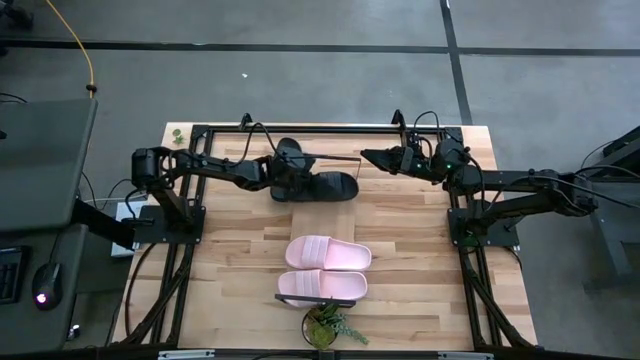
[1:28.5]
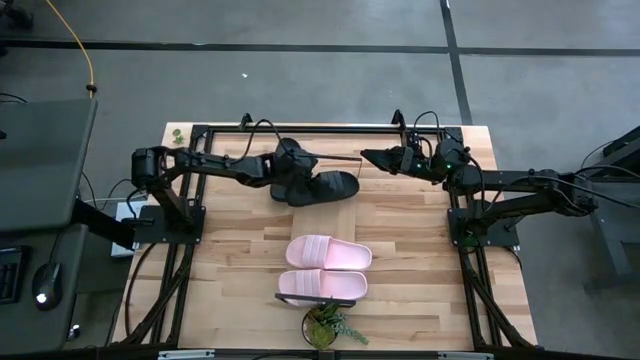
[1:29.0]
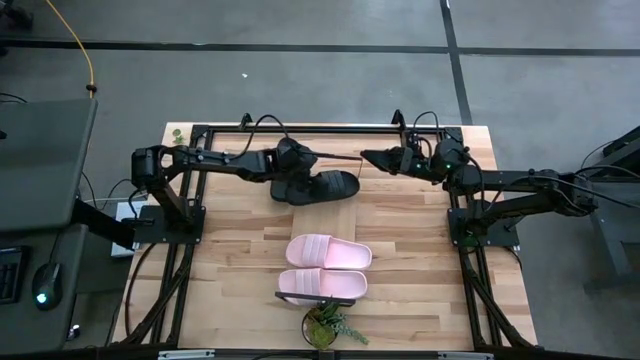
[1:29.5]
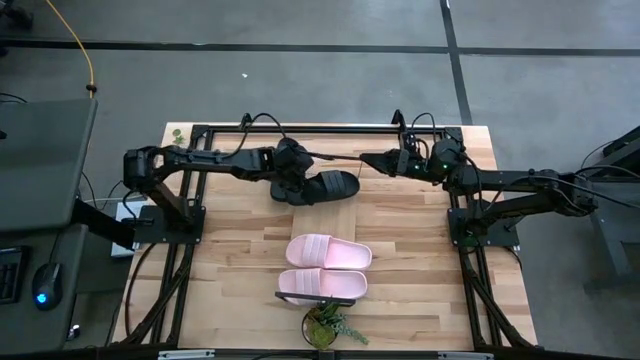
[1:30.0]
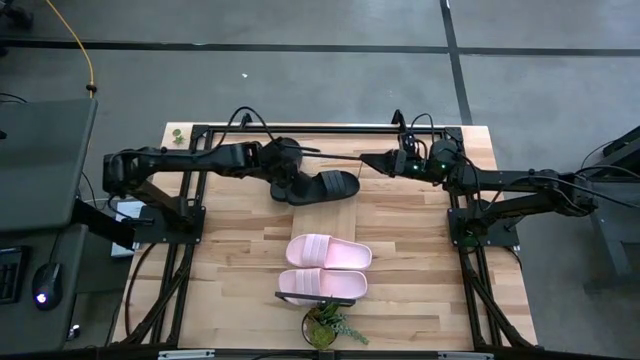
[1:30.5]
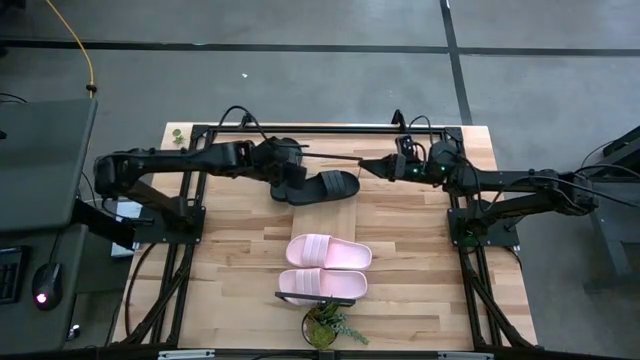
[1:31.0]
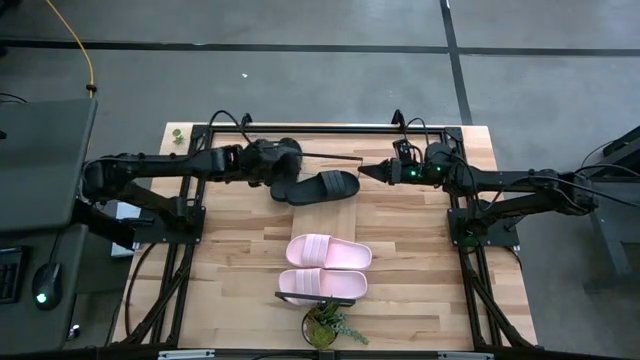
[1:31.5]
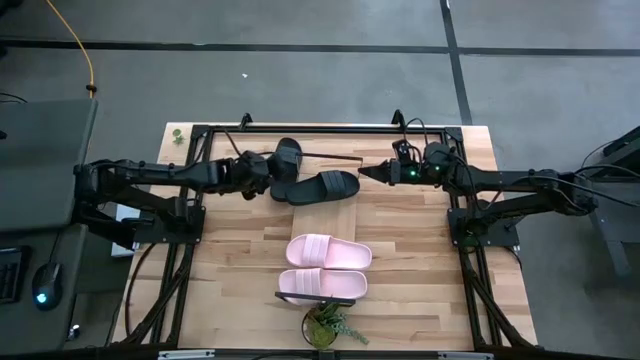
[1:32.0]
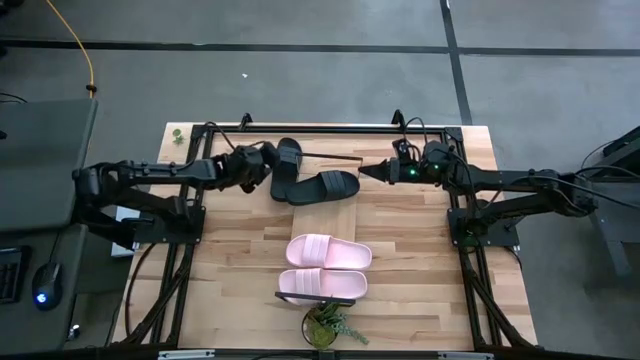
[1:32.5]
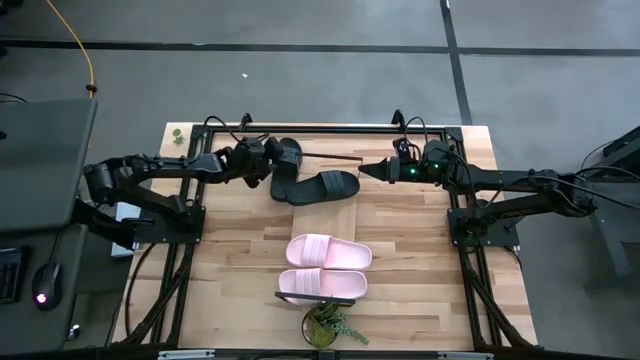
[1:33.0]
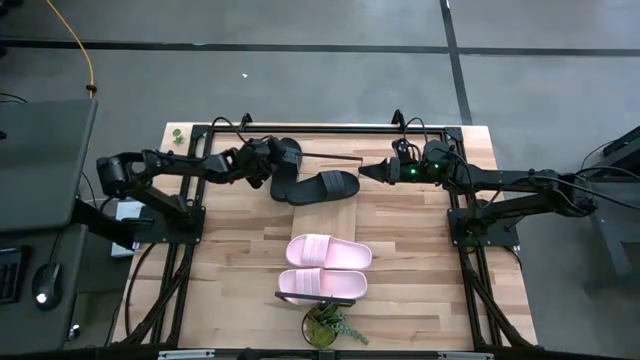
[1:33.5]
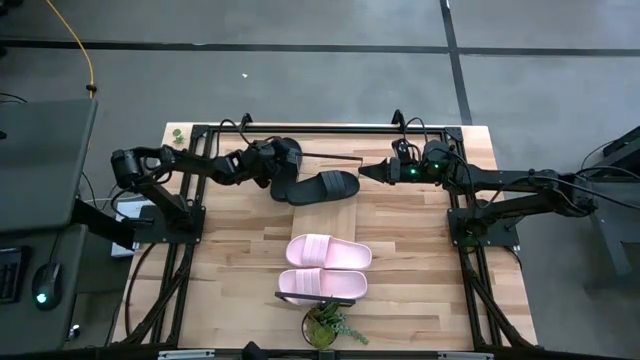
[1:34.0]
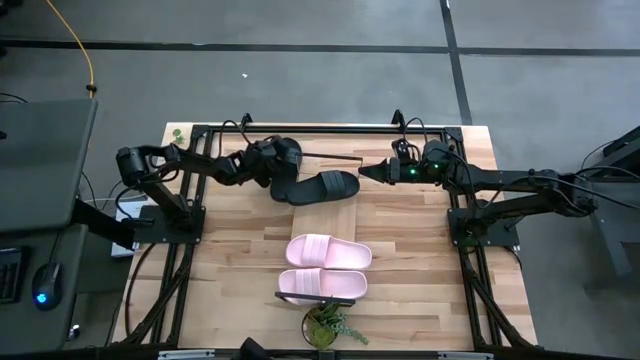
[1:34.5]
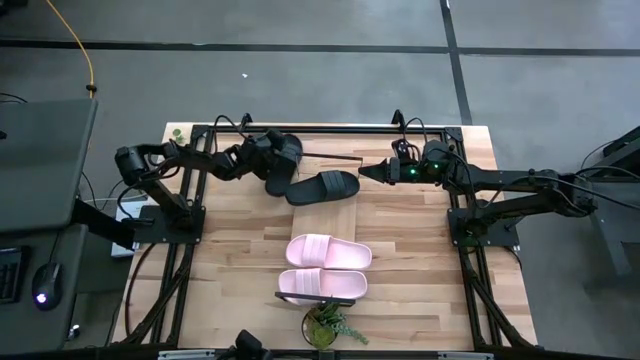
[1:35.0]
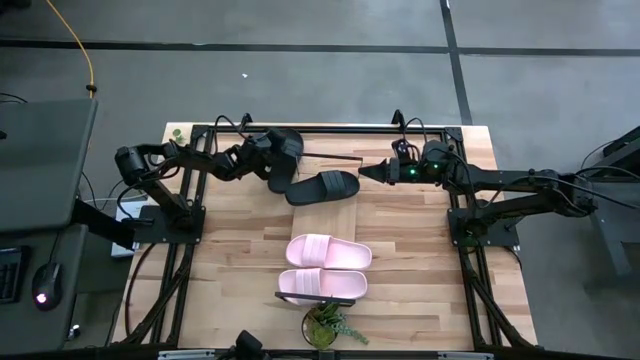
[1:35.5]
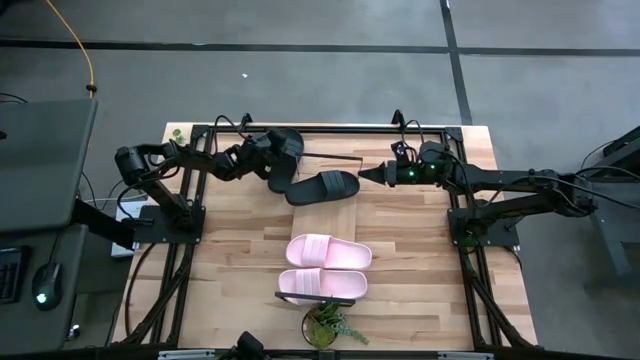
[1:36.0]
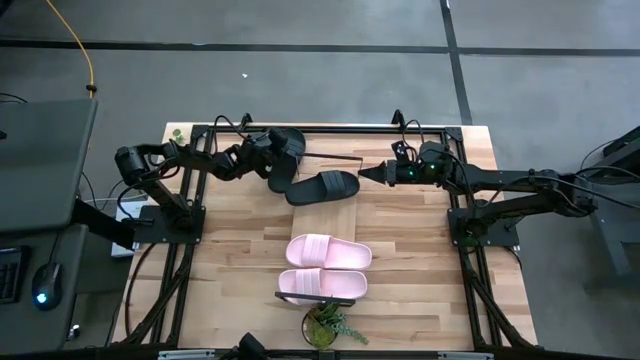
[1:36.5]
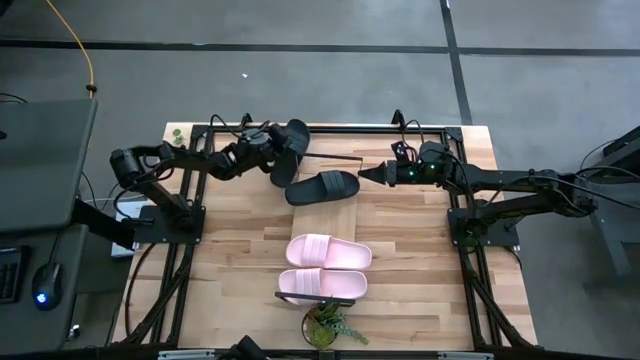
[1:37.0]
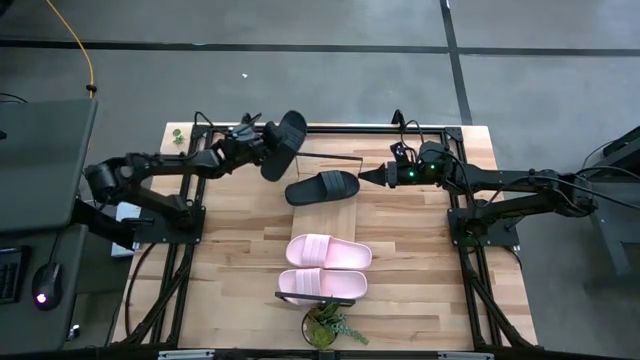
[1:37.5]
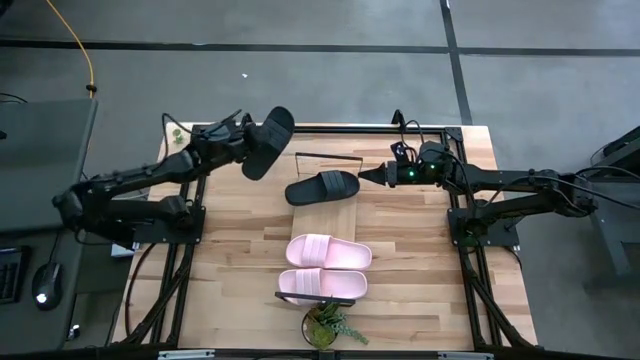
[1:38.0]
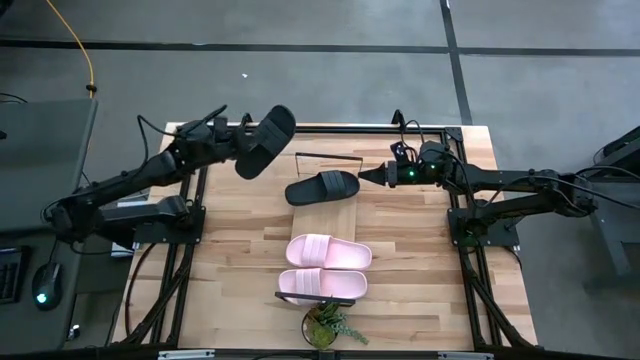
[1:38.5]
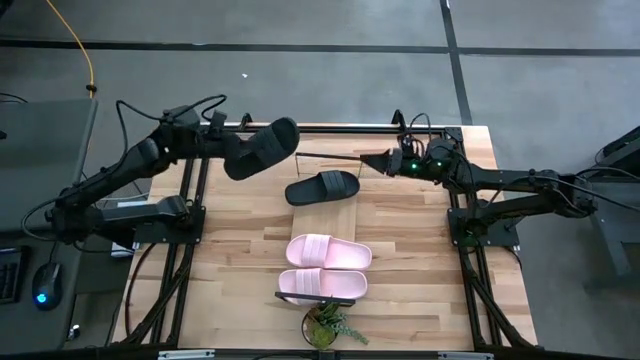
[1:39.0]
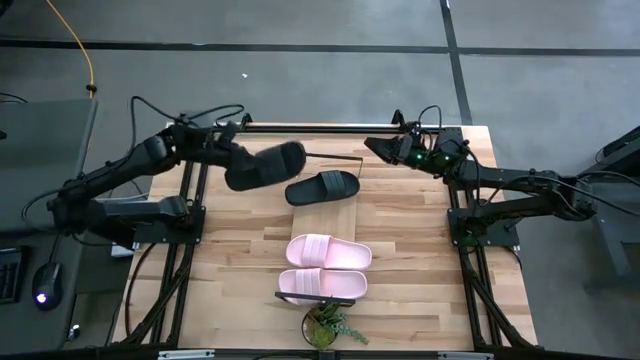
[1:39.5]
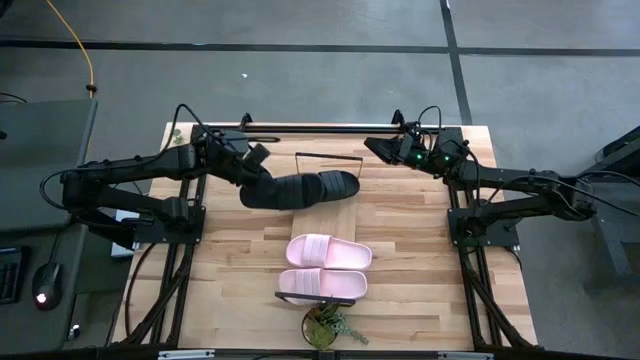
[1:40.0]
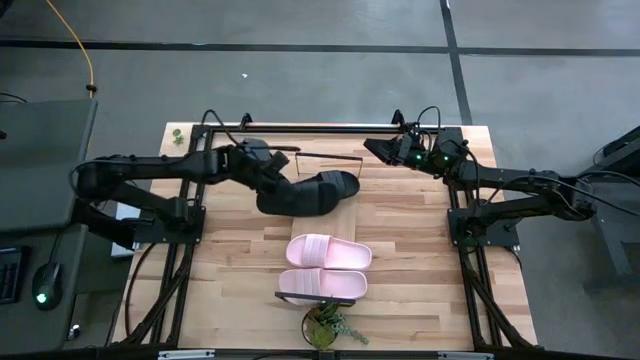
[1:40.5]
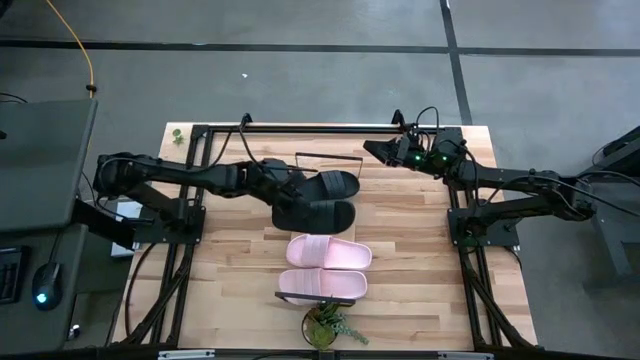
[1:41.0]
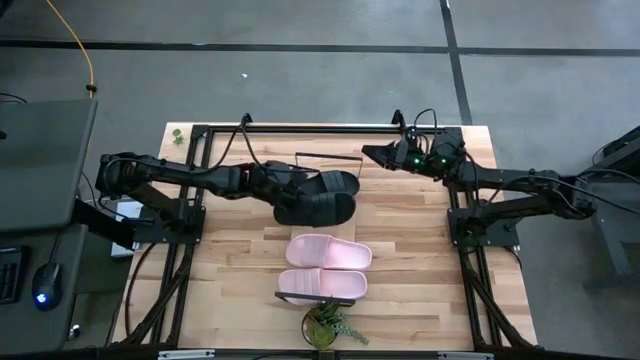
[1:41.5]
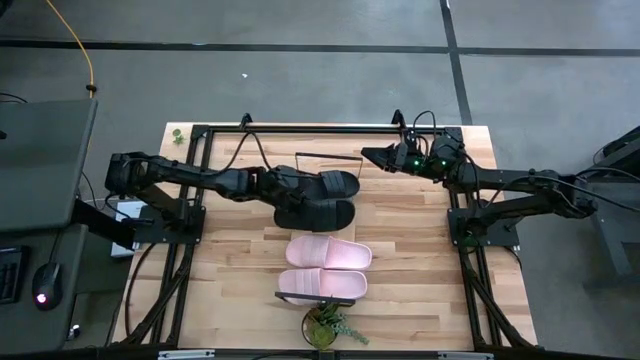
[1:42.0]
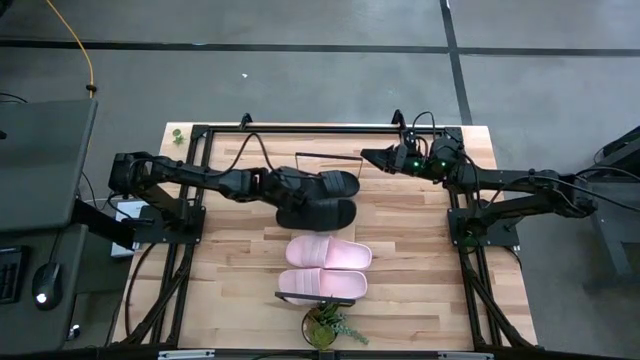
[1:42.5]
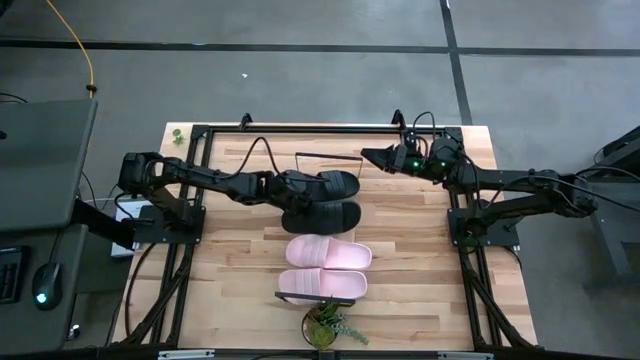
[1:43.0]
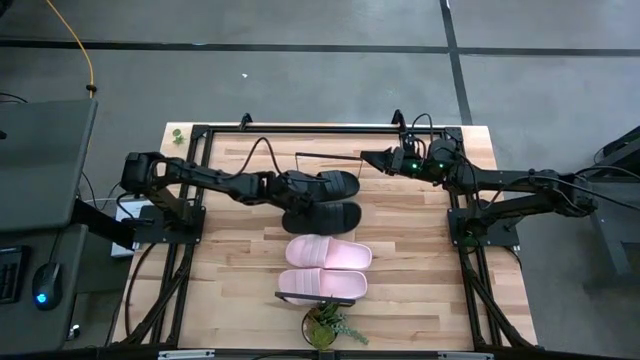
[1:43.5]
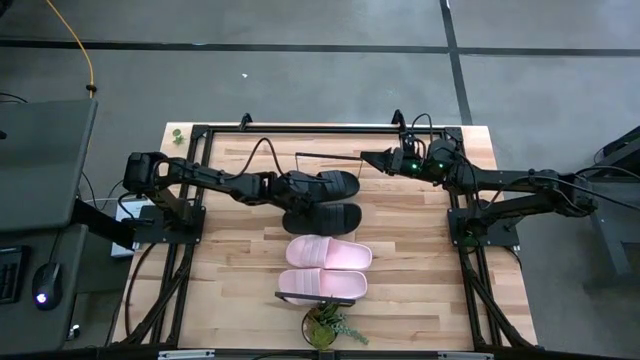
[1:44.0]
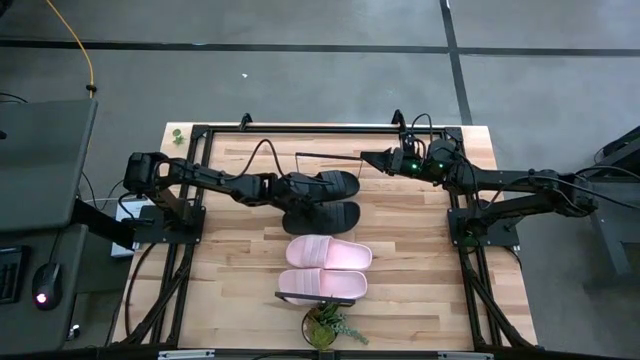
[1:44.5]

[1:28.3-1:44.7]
Task: Pick and place slides into the shelf
Put the black slides on the shelf

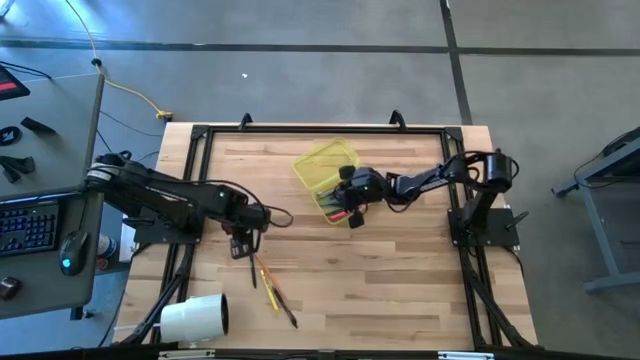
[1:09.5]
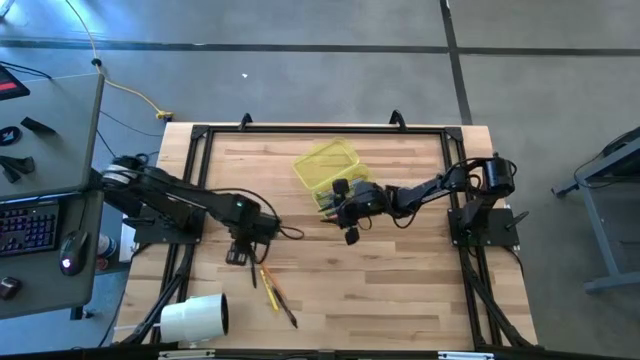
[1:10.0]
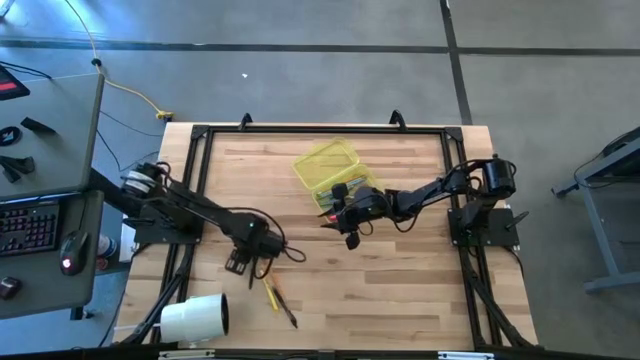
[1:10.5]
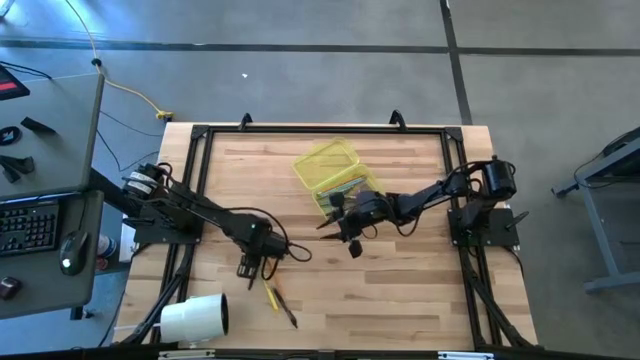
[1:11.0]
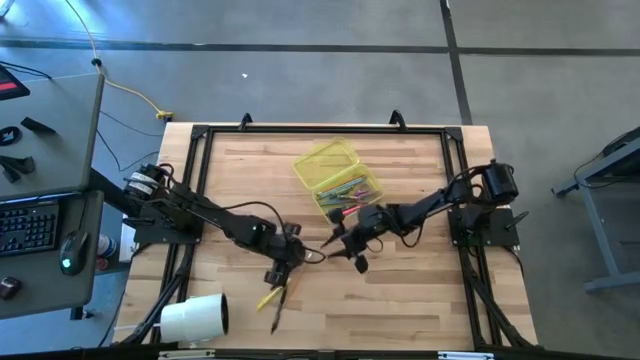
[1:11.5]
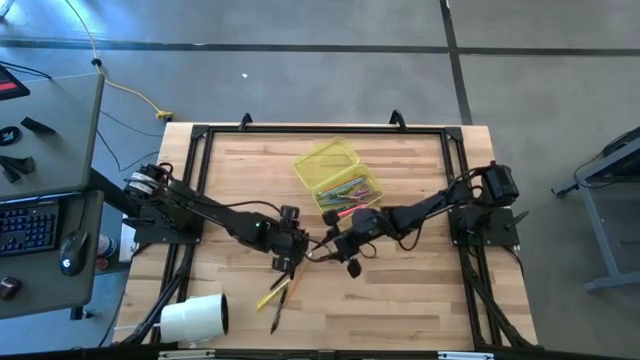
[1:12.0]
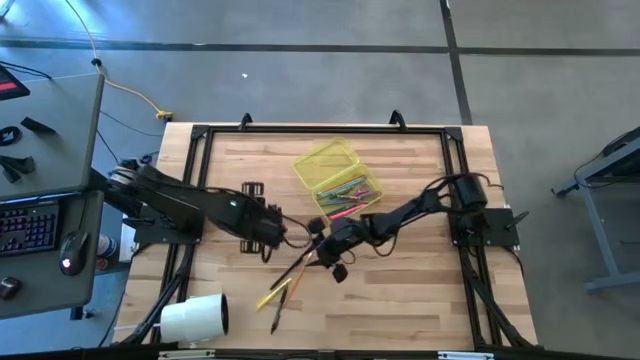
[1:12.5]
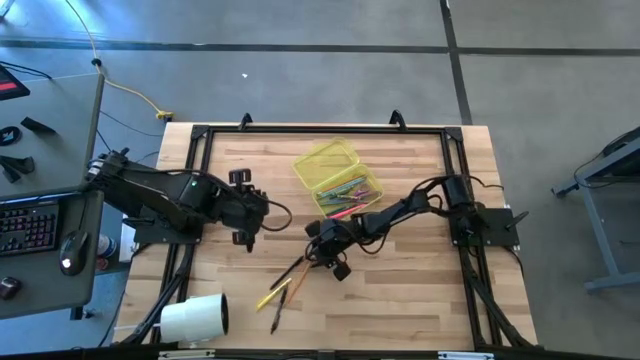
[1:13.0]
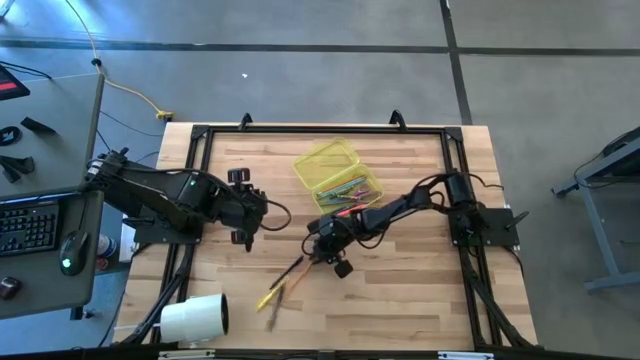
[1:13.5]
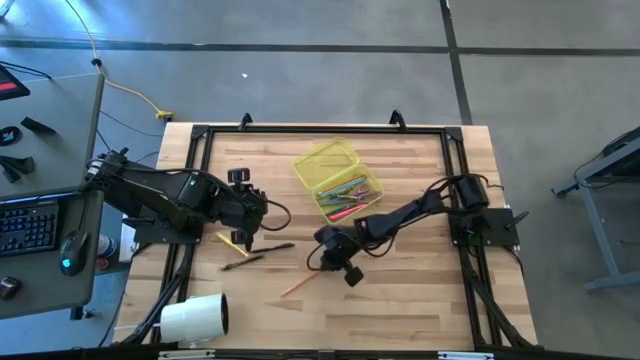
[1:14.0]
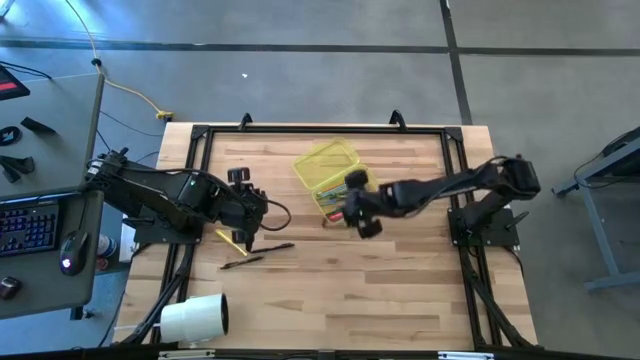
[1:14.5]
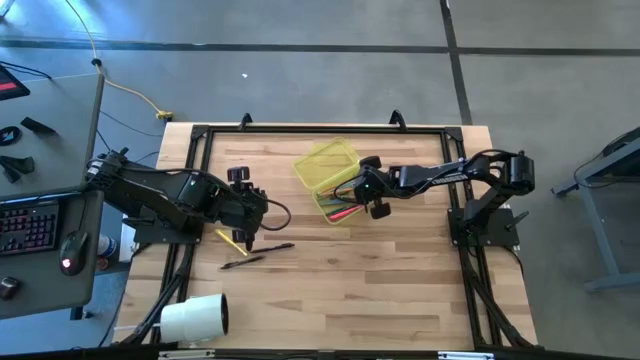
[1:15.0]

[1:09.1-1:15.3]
Task: Pick & place school supplies into a supply box
Put the orange pencil into the supply box
